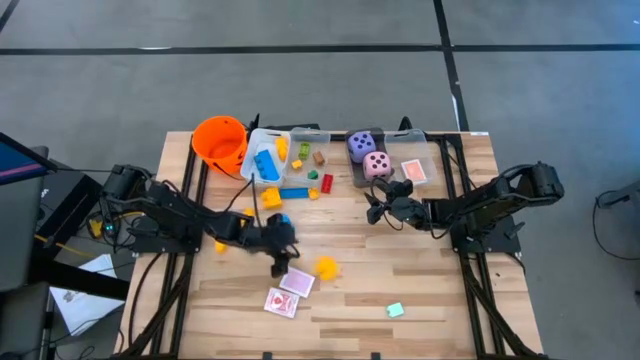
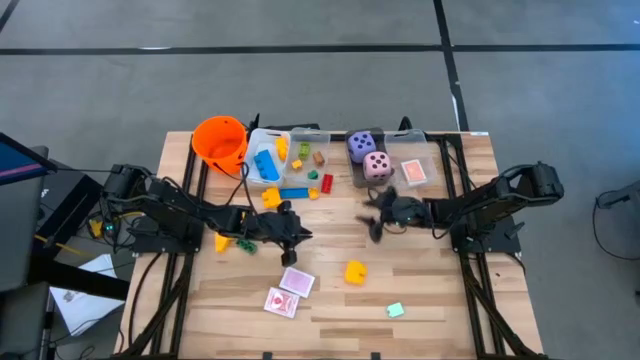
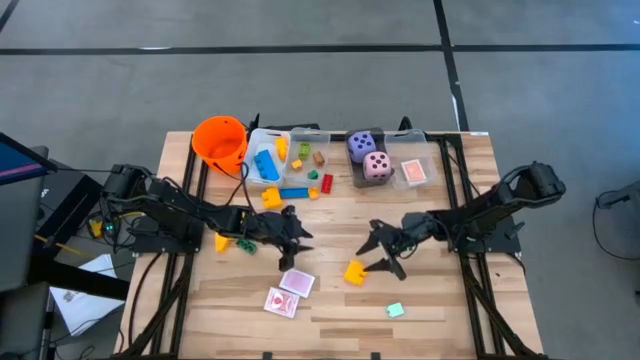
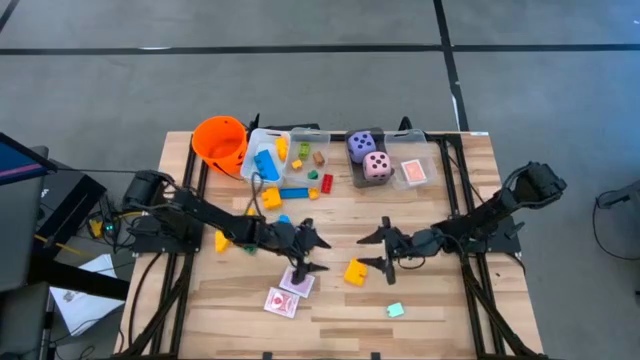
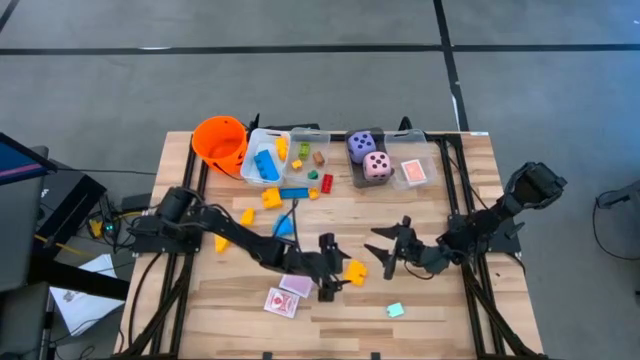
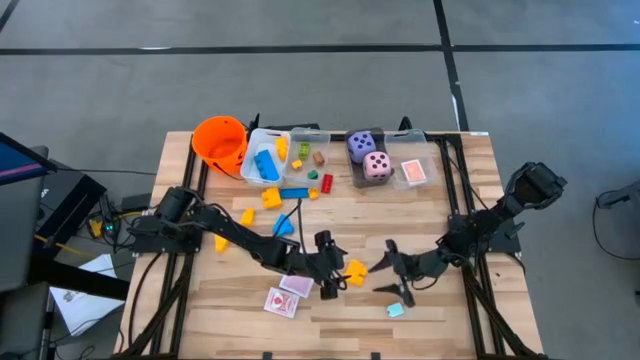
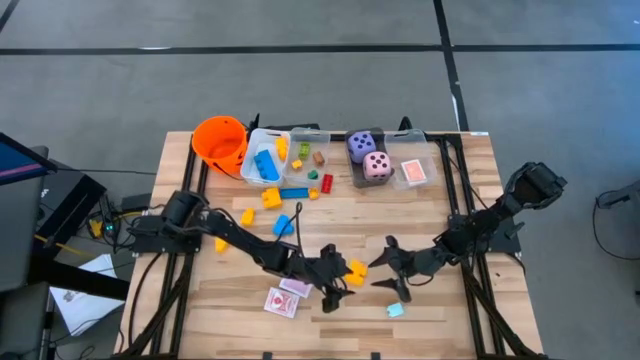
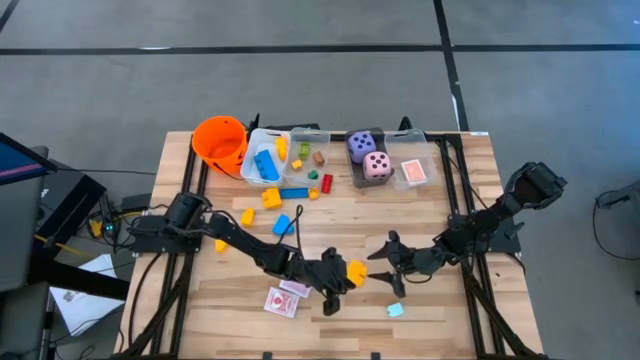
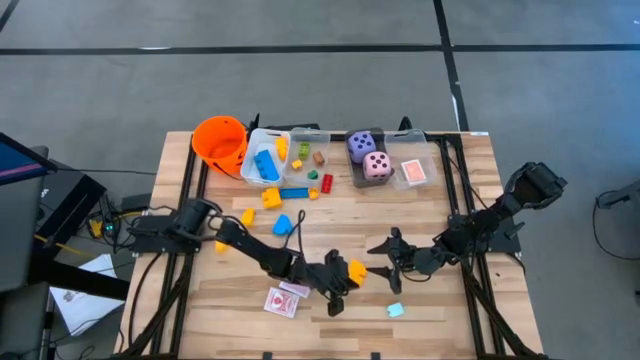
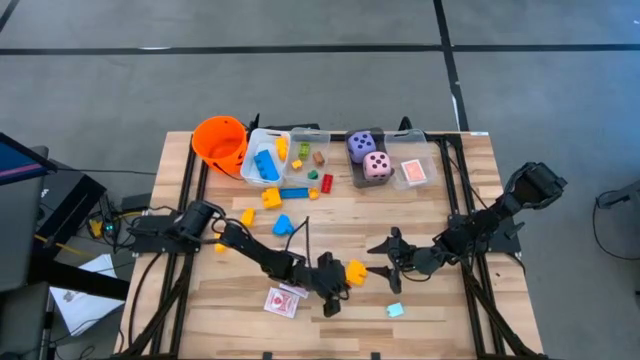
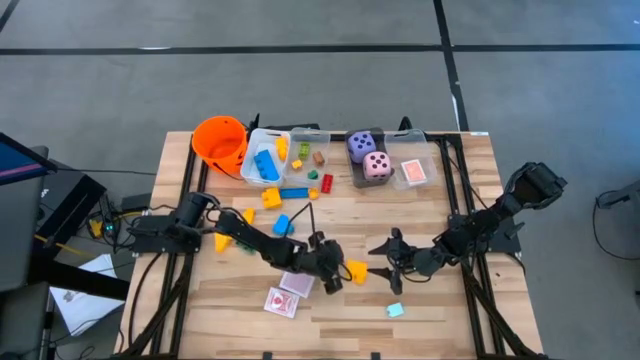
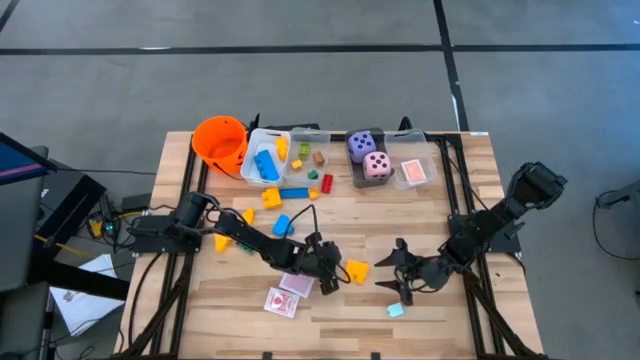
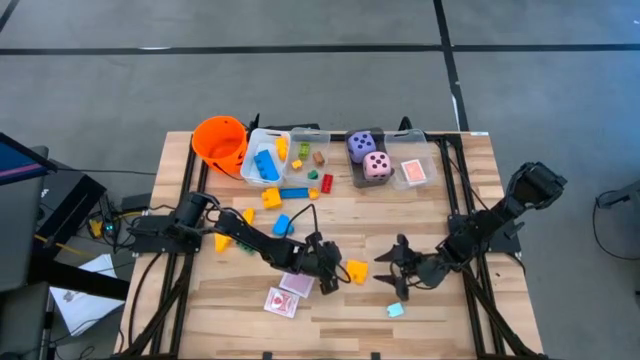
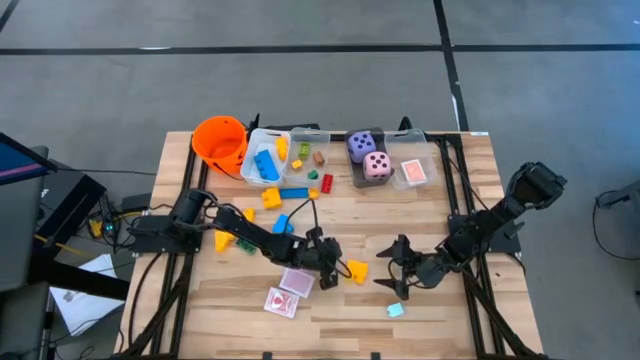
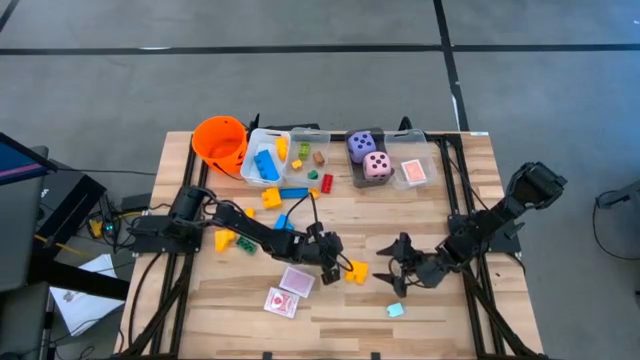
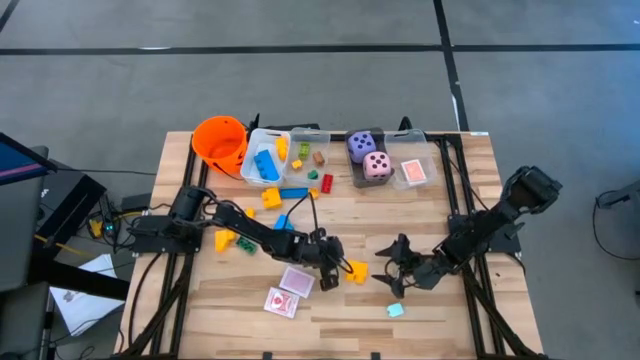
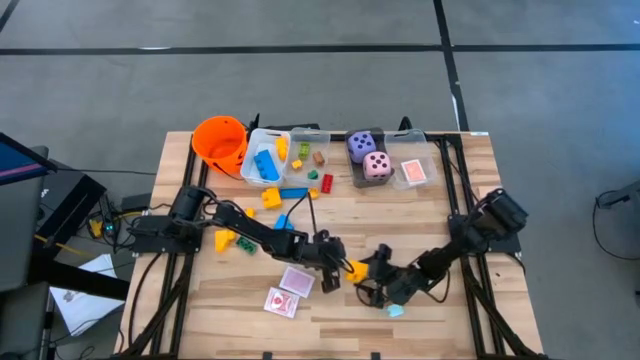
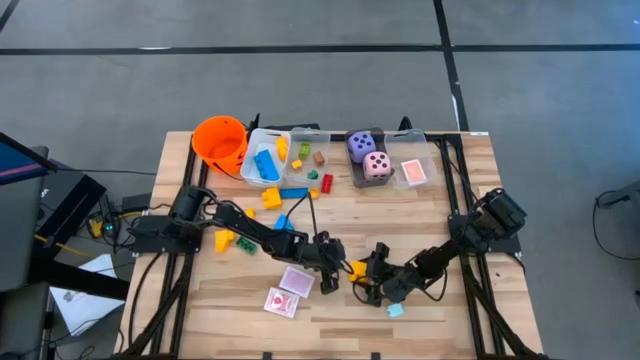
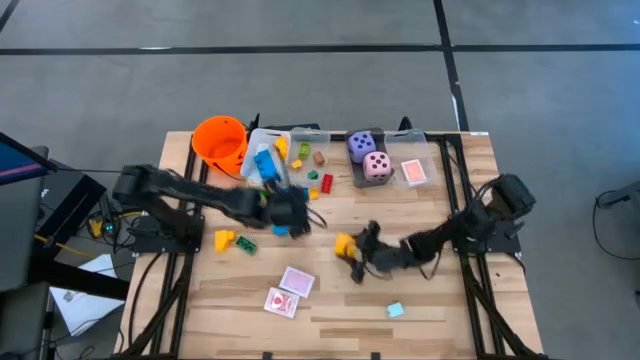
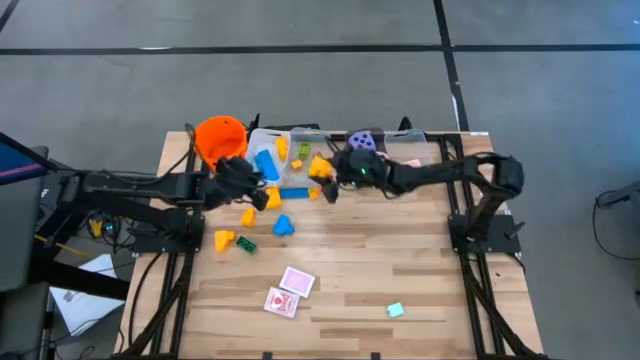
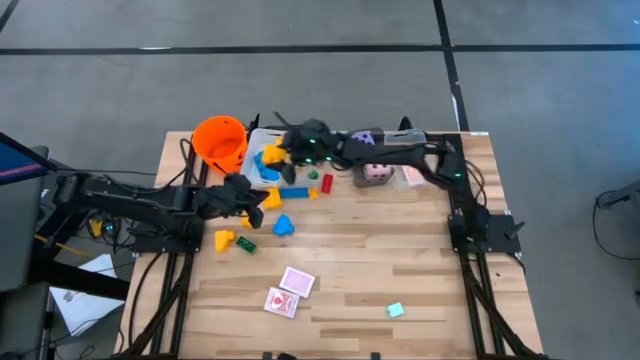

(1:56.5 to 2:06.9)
Task: Pick & Place Toys
Put the large yellow game piece into the white bin

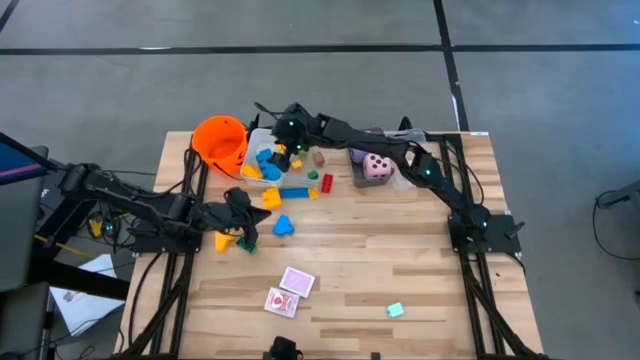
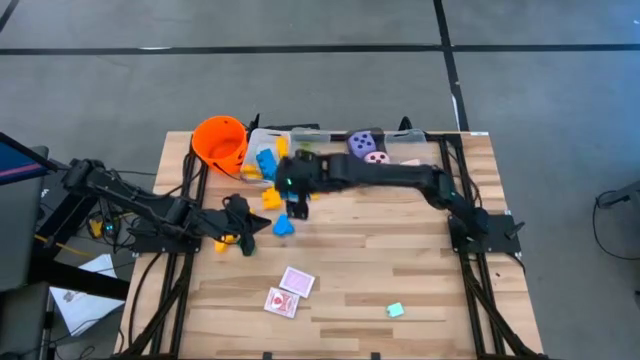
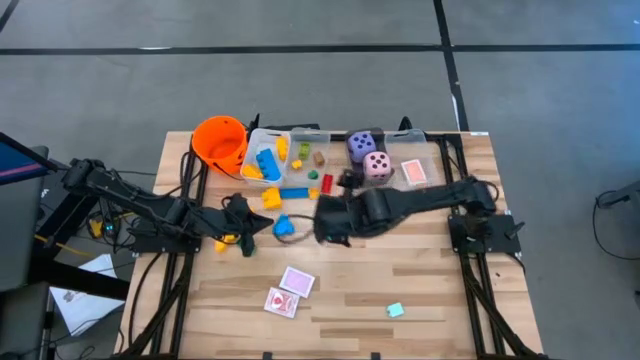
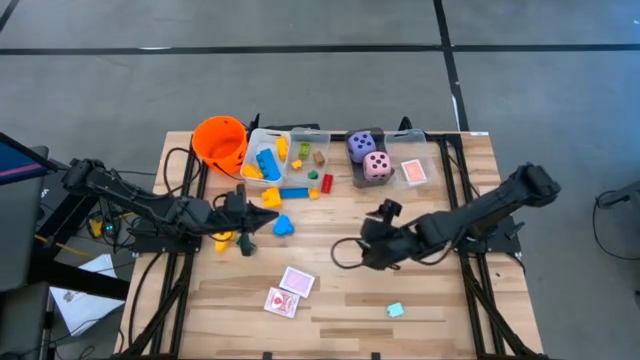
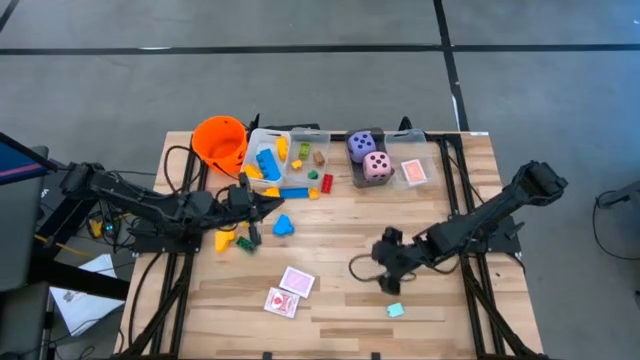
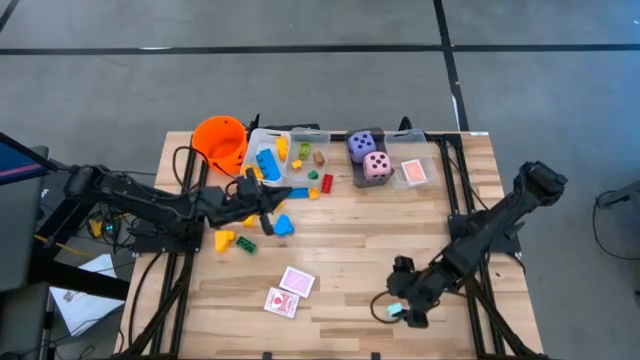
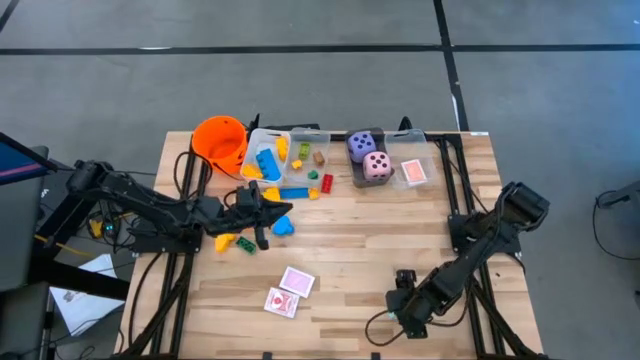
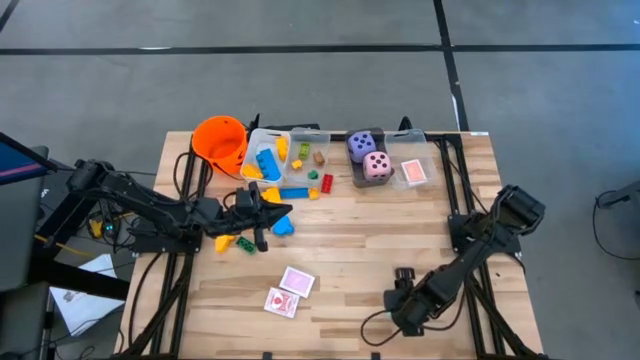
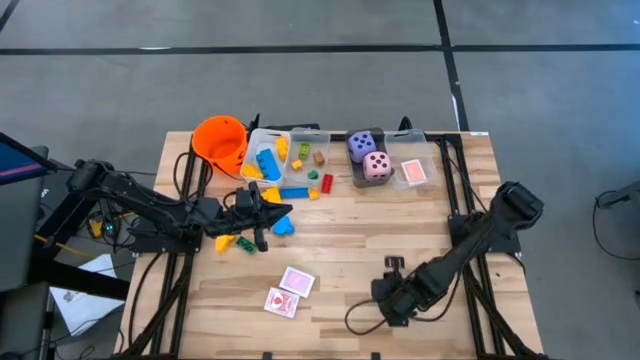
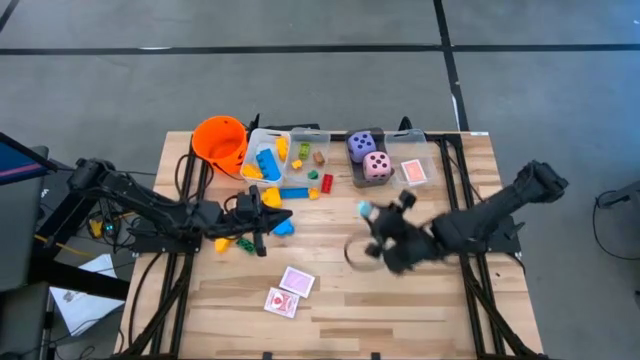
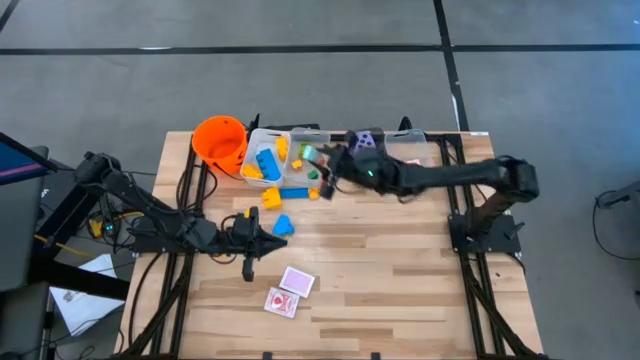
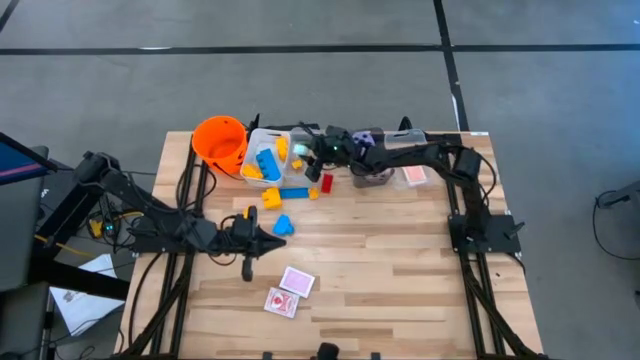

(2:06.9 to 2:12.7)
Put the small light blue game piece into the left transparent bin

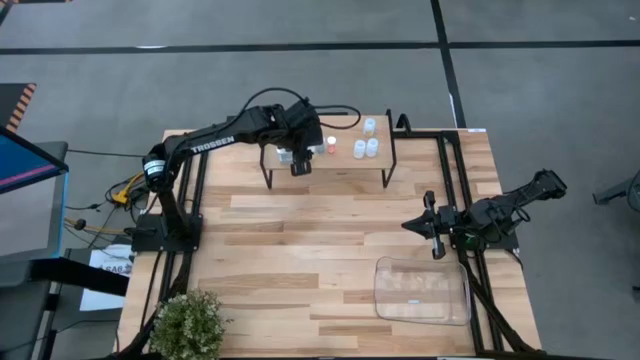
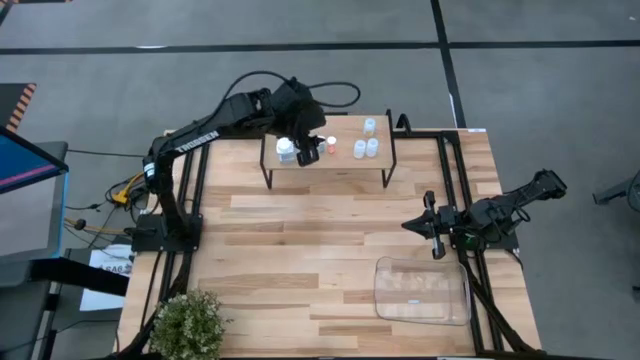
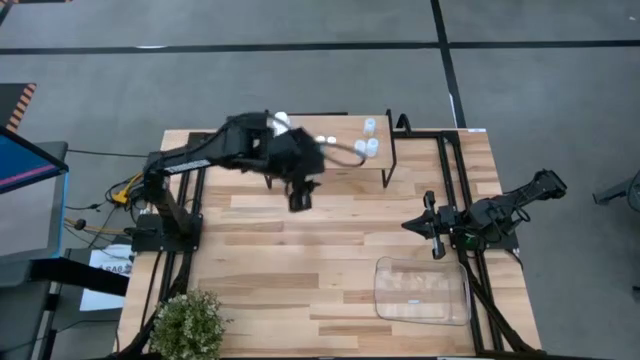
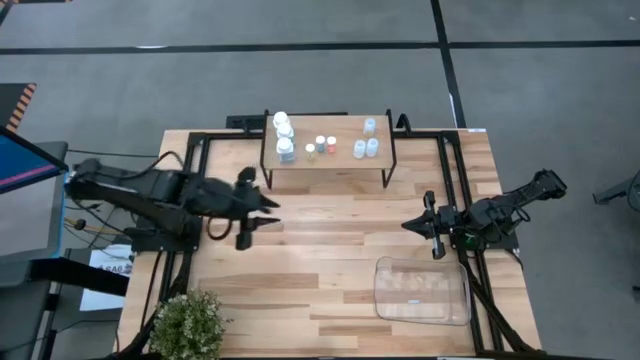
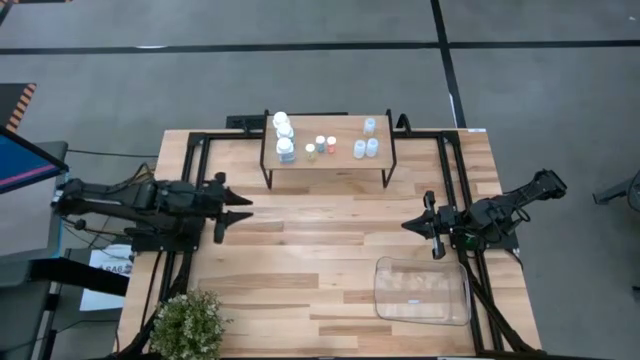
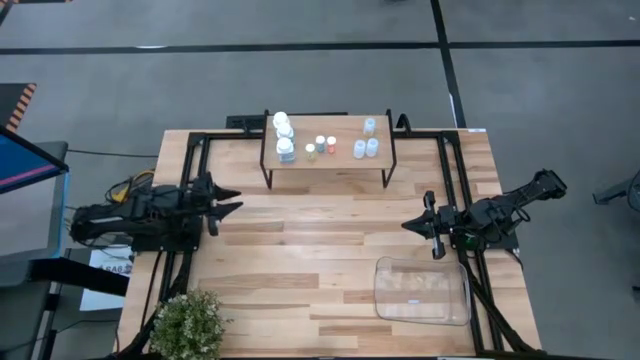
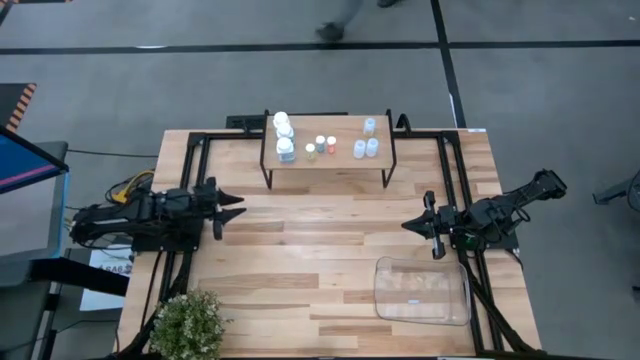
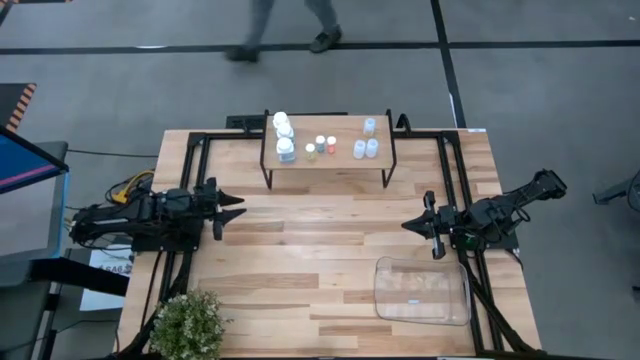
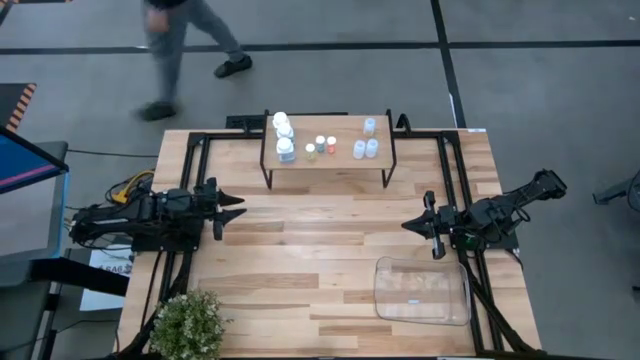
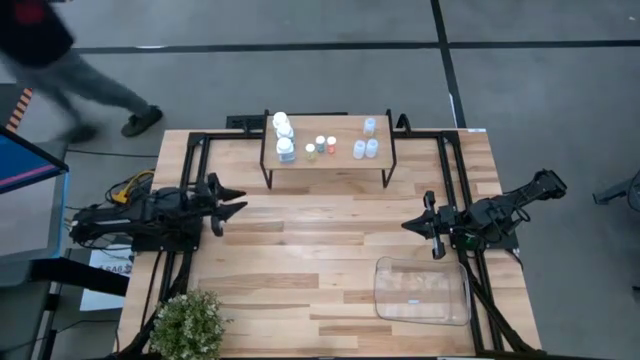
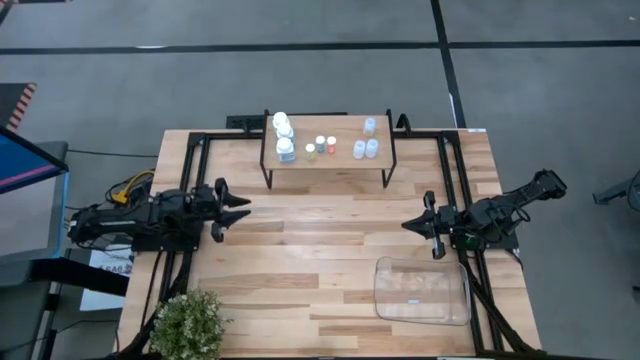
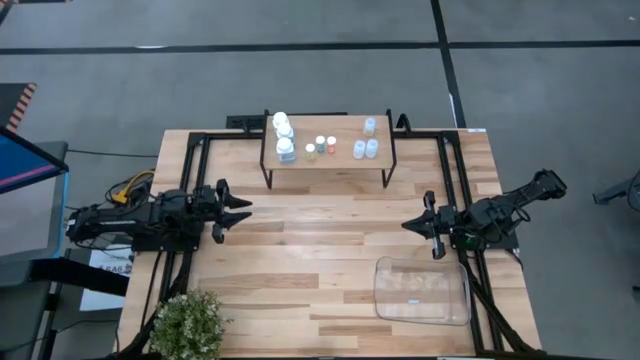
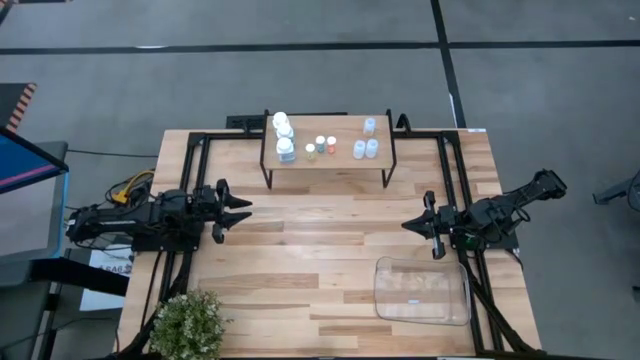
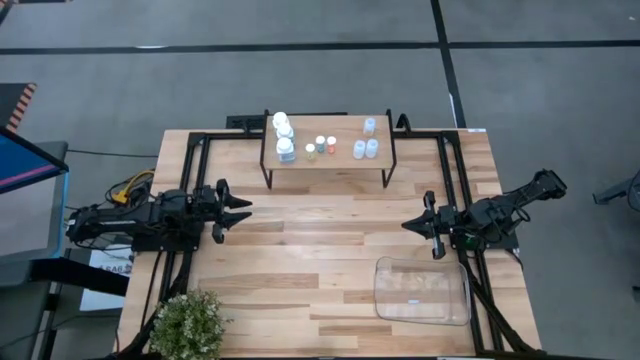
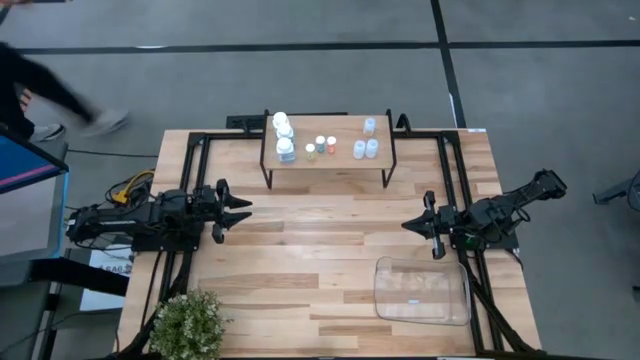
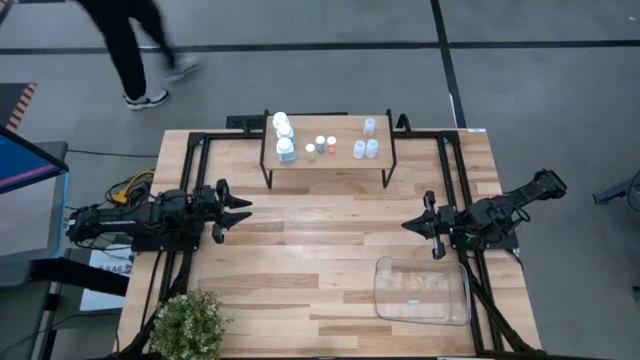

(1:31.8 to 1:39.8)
Task: Pick and place medicine bottles onto shelf by color
Return to Home Position
